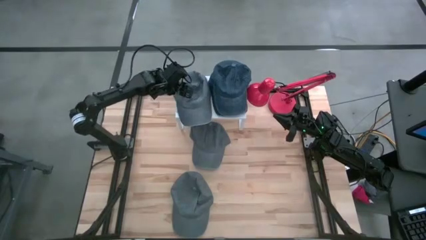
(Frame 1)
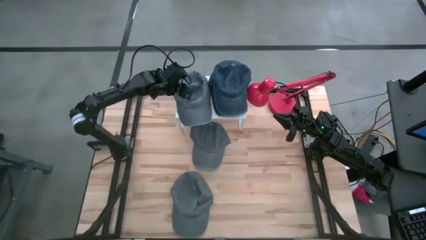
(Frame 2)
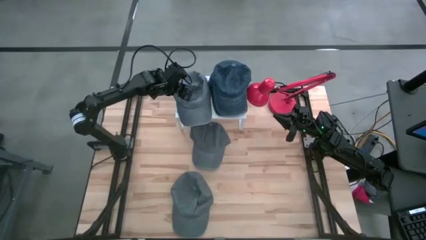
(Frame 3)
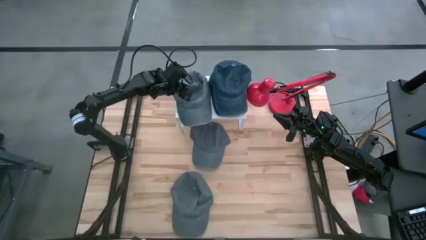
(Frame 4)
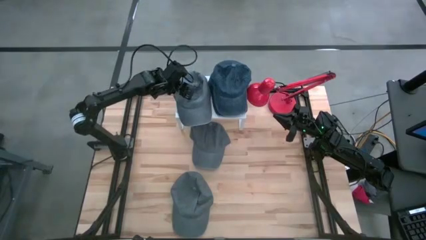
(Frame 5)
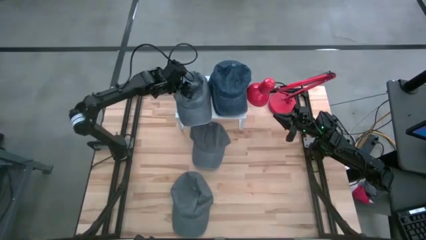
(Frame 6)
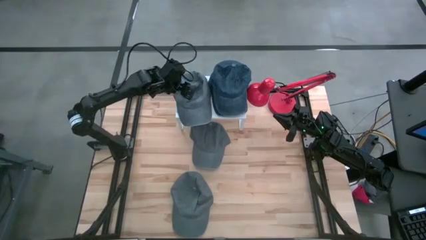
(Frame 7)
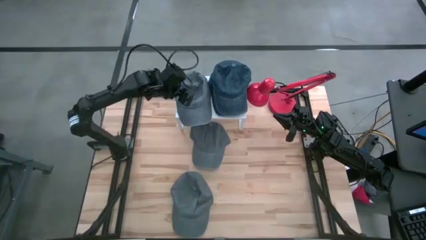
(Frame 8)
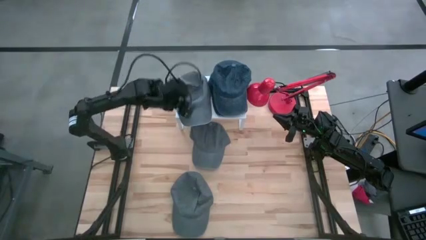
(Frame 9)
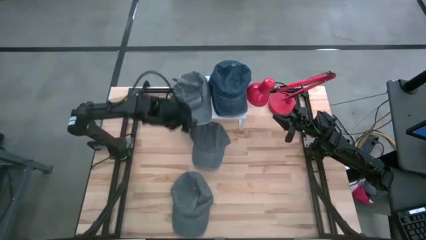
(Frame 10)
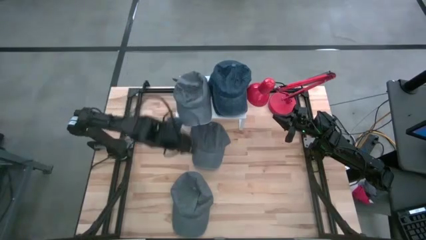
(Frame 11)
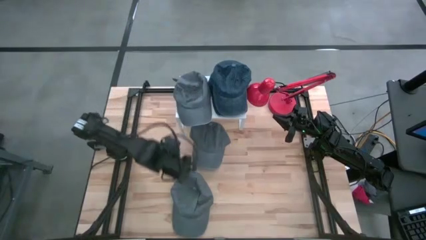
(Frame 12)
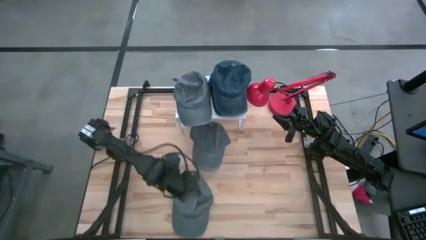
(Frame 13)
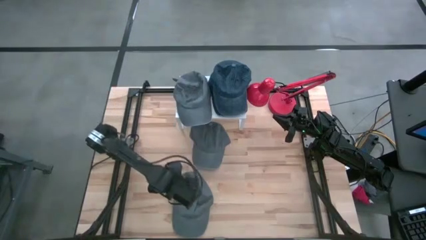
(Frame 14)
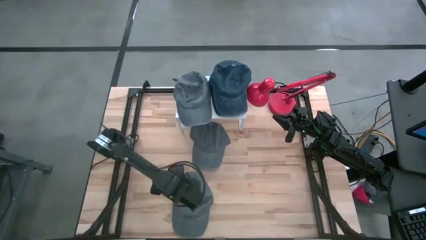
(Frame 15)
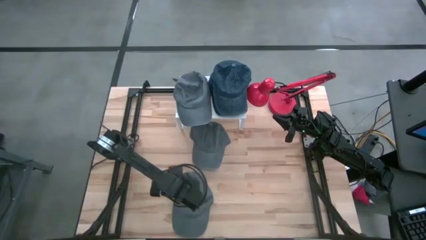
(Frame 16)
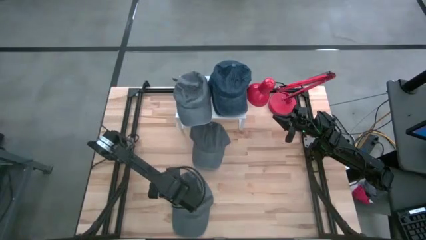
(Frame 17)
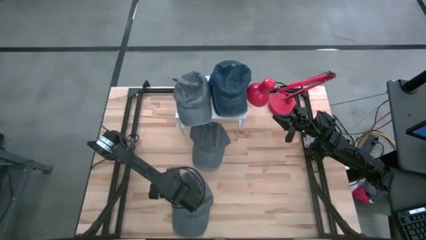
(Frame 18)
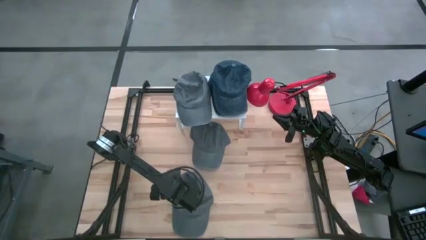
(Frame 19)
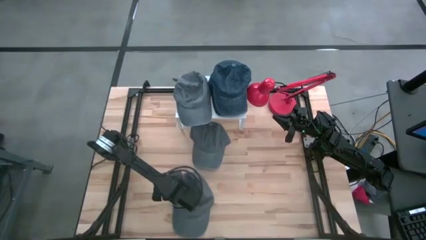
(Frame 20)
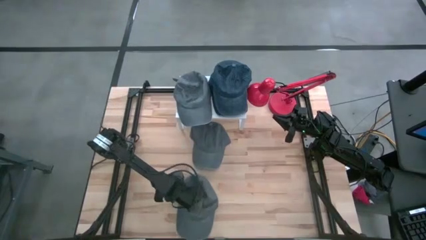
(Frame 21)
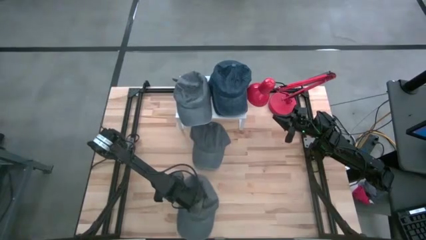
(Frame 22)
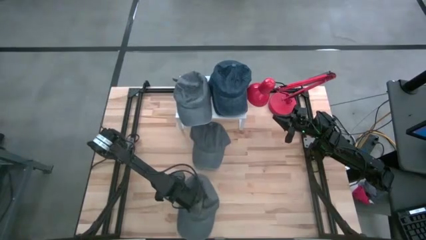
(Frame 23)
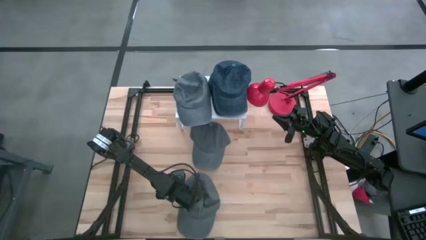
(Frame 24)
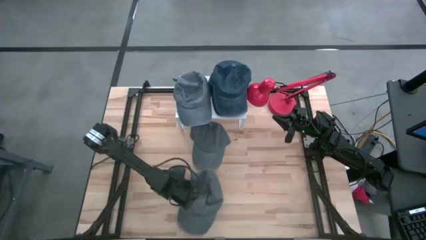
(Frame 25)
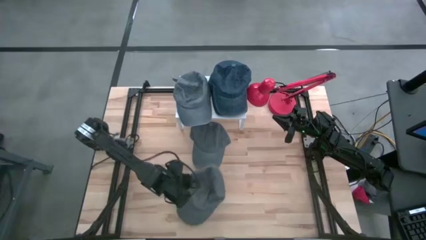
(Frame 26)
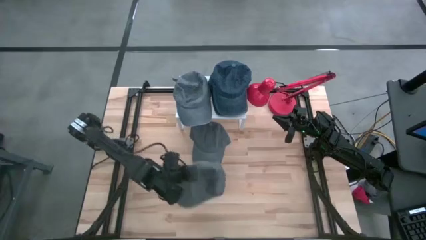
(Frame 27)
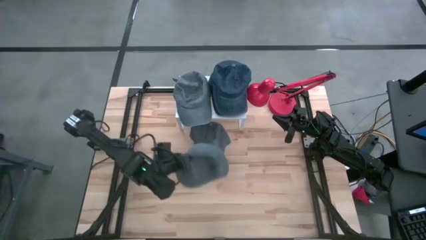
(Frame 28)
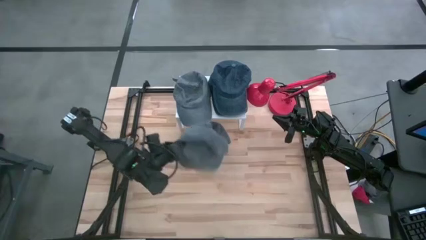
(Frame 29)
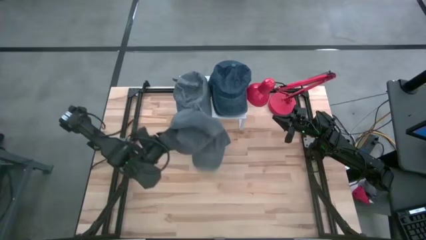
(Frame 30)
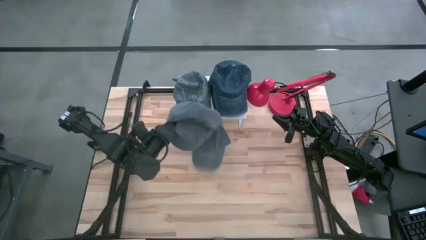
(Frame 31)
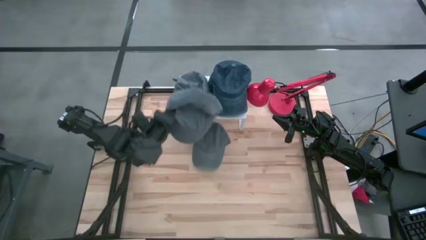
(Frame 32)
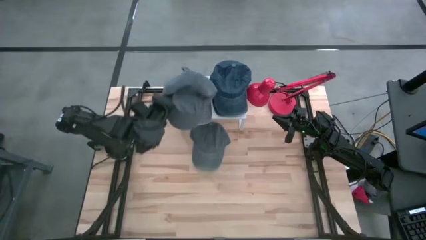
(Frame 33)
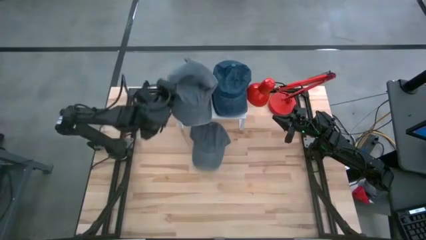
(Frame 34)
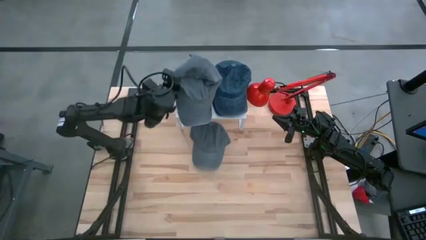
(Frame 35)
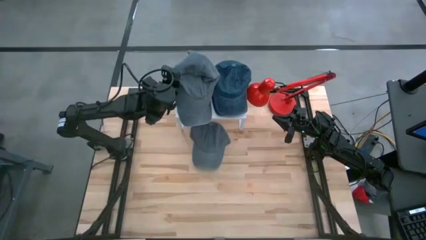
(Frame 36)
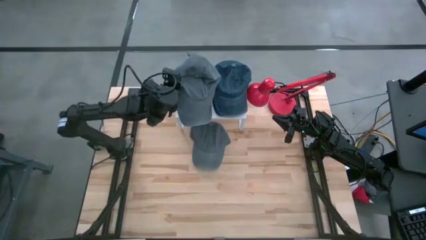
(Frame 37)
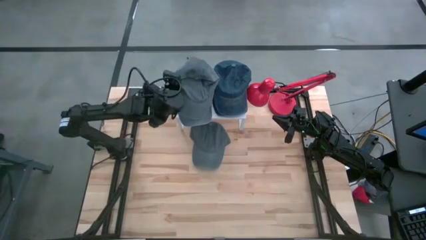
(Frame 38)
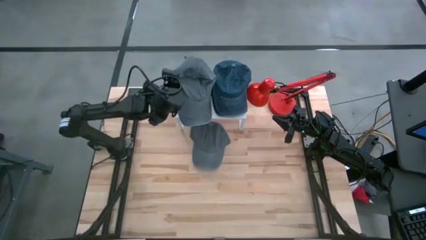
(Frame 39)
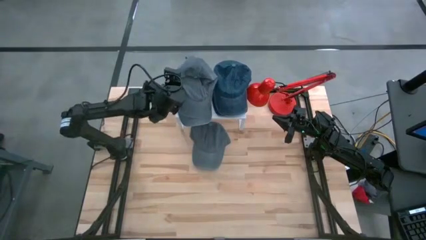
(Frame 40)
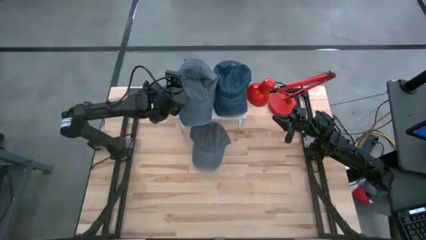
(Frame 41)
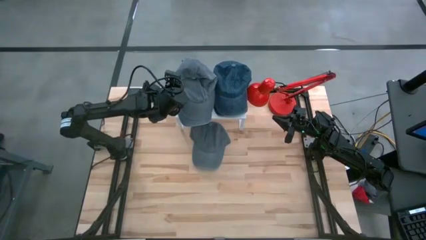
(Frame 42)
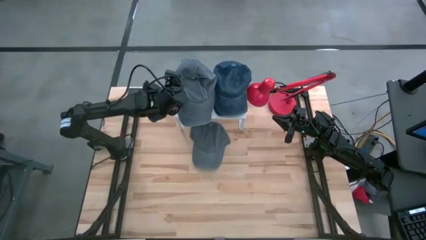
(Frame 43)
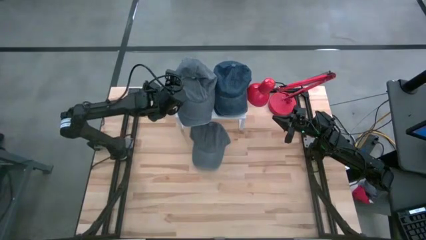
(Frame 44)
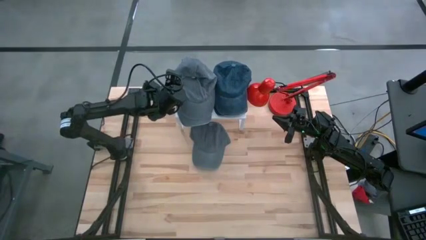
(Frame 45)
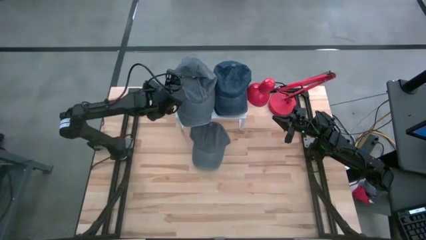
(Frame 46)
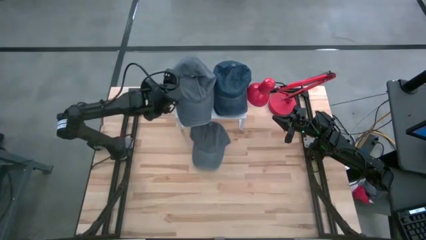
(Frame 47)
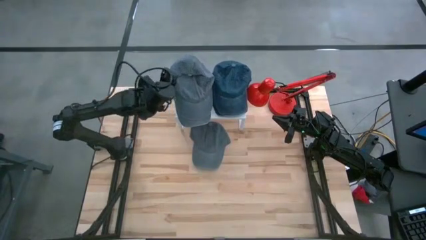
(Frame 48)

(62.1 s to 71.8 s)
Task: Pick & Place hat
Stack the bottom gray cap on the gray cap on the shelf

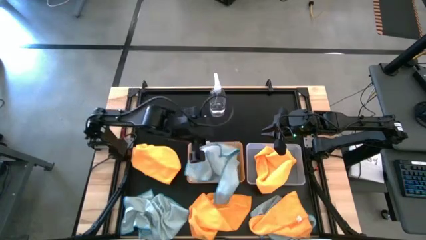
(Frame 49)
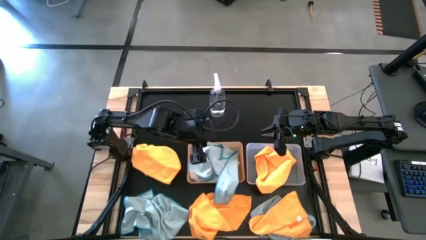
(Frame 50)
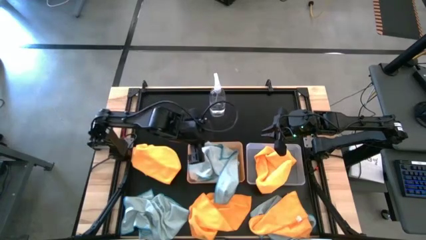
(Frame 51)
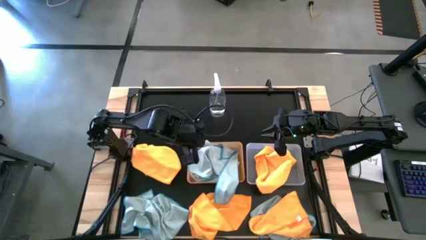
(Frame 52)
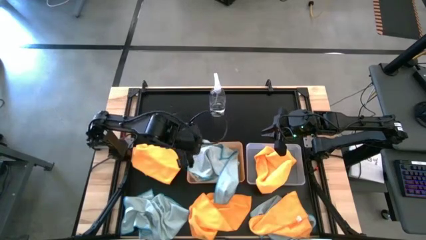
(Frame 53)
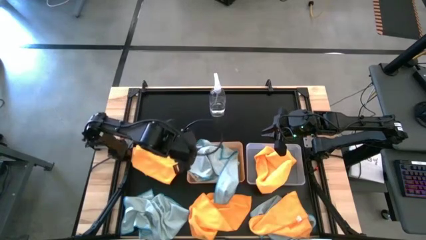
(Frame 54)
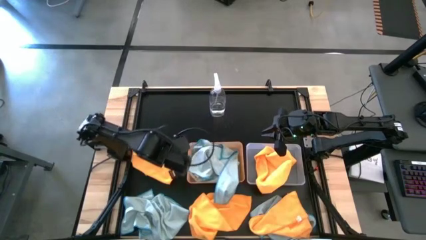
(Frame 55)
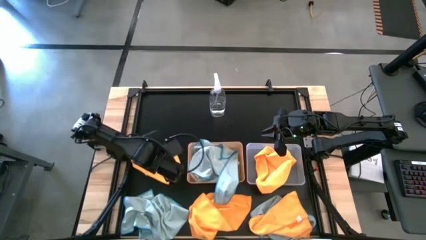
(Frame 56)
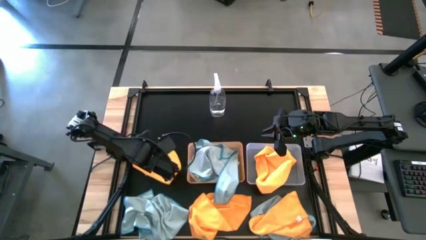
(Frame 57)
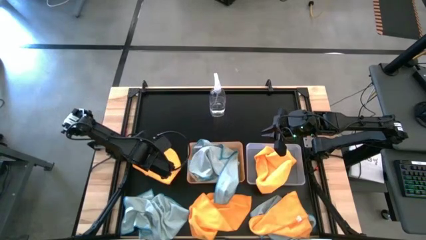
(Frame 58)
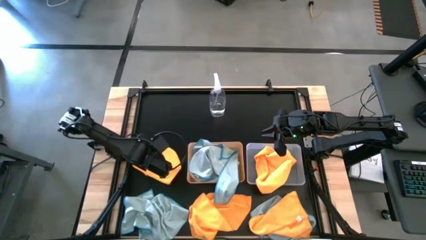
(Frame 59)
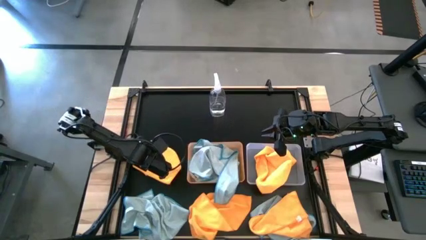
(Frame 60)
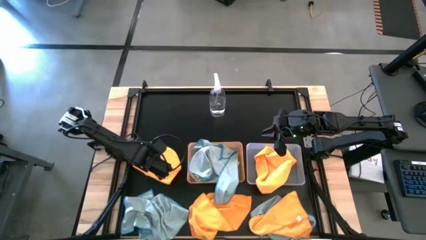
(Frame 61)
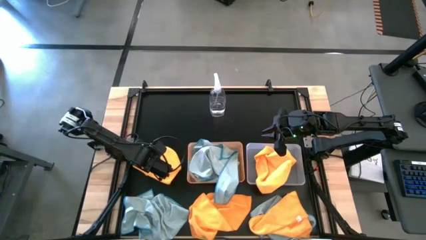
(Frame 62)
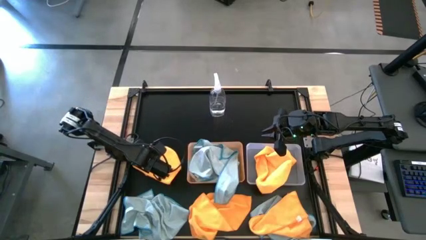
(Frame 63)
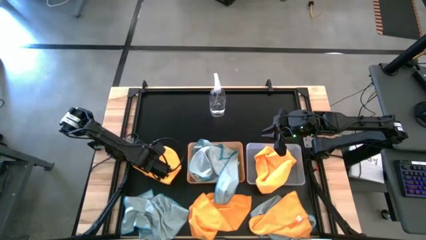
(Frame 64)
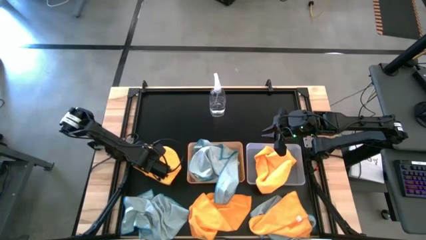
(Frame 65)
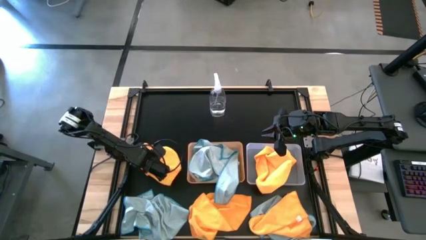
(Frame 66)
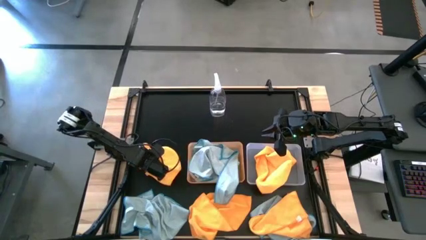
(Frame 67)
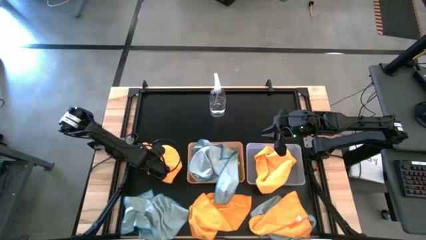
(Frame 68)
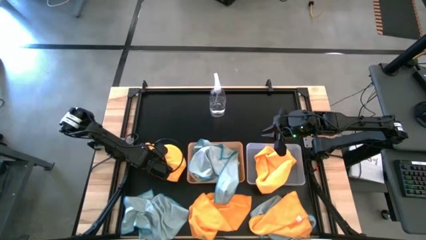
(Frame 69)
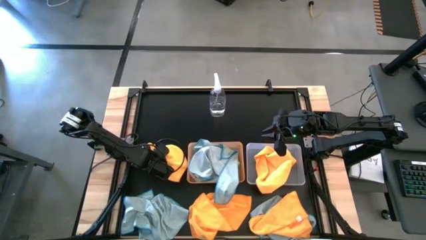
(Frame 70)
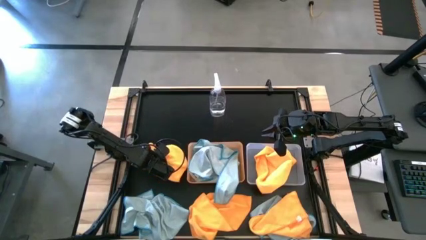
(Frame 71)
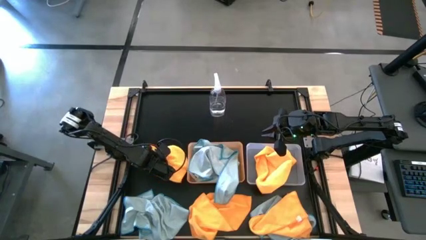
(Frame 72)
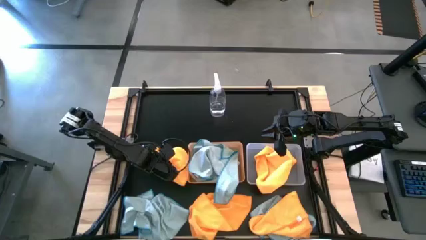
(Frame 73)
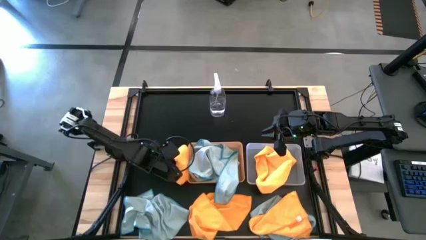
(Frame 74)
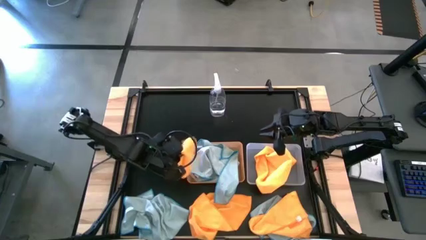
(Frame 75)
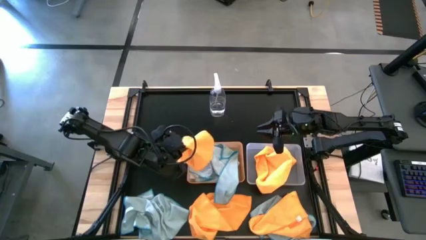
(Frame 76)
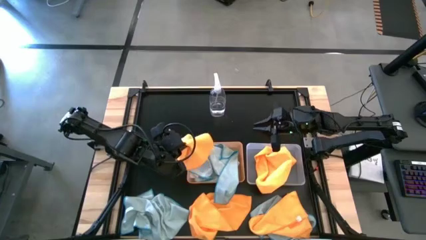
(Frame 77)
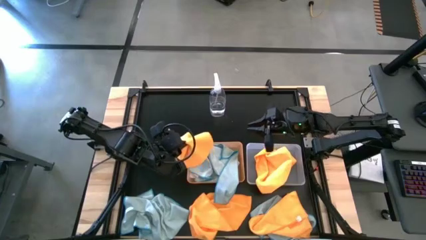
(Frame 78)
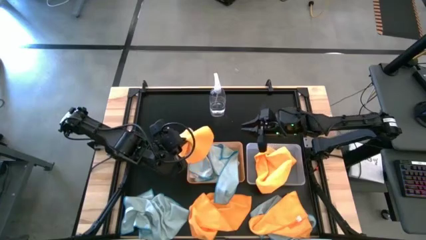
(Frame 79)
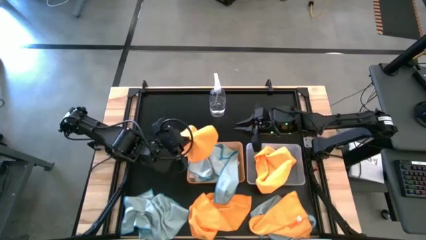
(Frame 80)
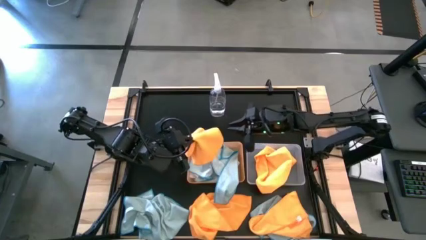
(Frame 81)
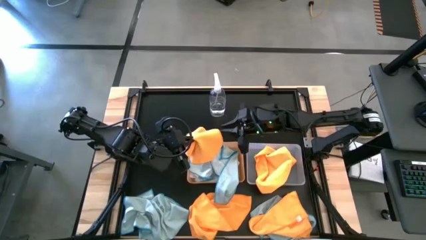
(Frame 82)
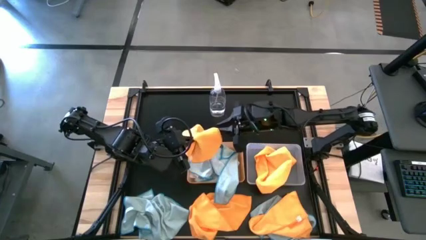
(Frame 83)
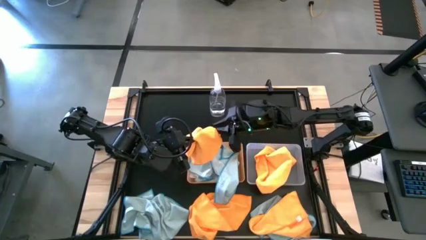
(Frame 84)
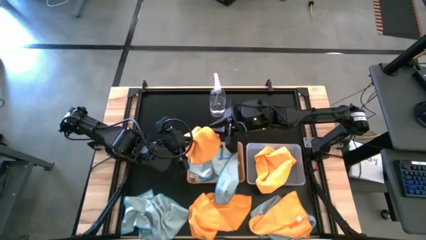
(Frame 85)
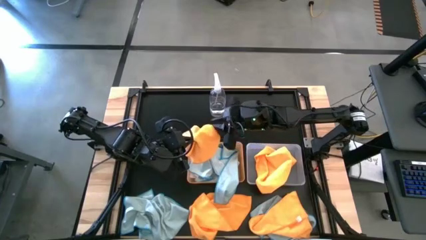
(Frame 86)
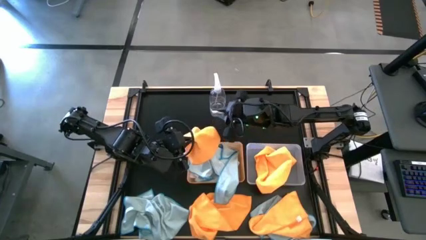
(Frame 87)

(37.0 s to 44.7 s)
Task: Sort microfiber towel by color & place in baskets
Put the orange towel into the transparent bin
